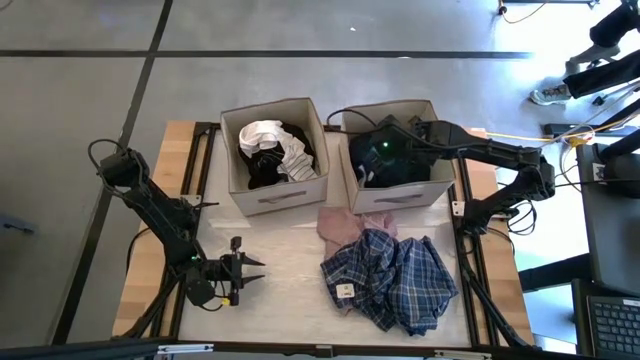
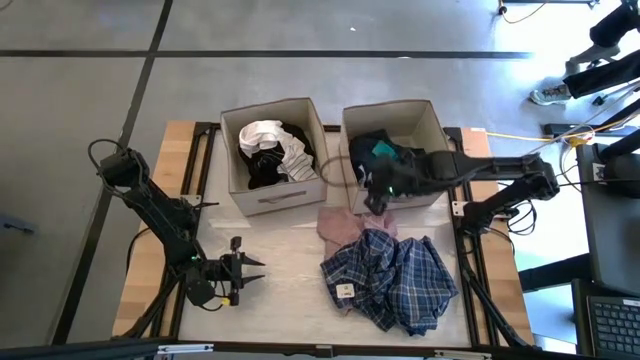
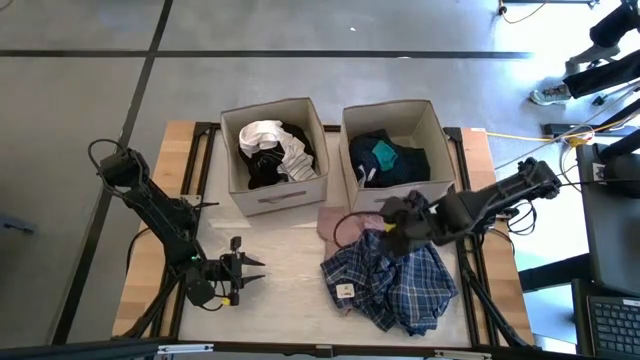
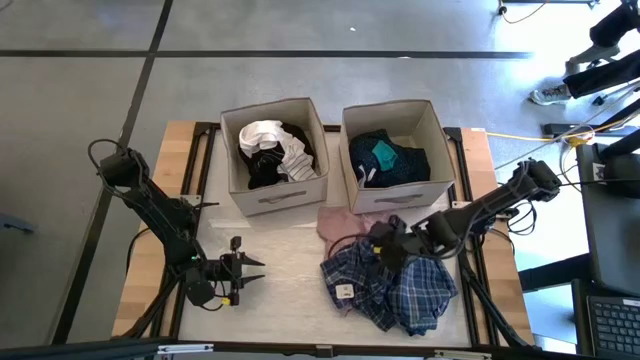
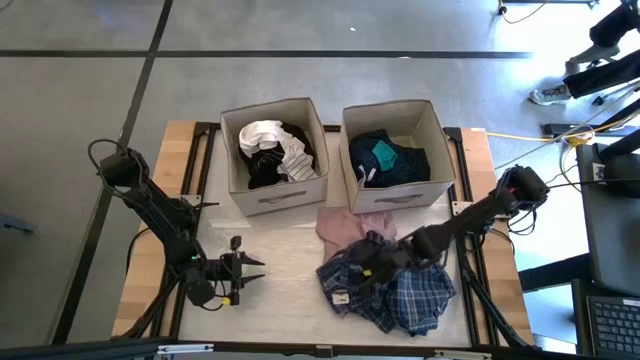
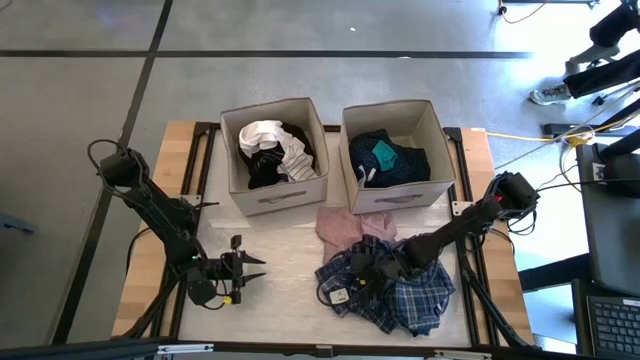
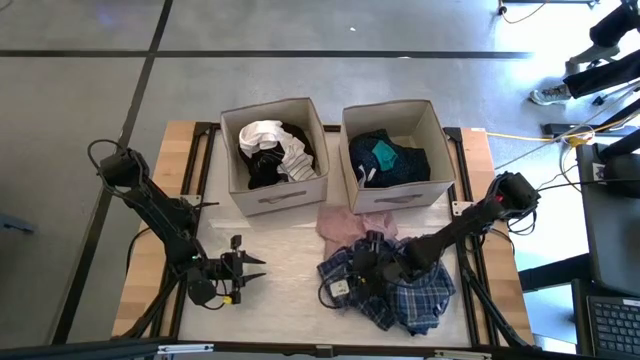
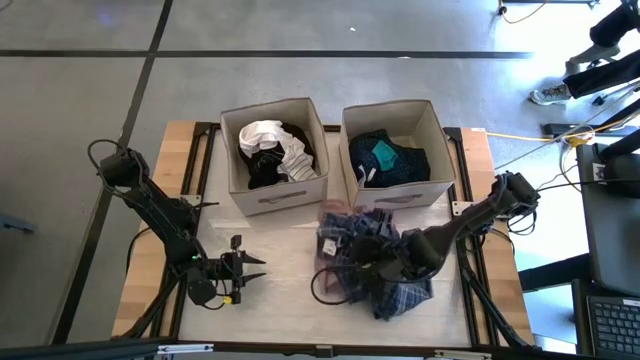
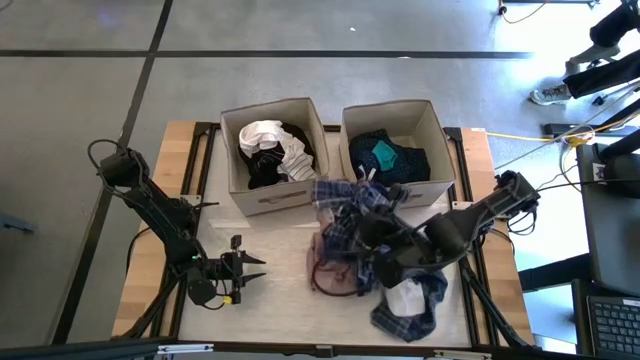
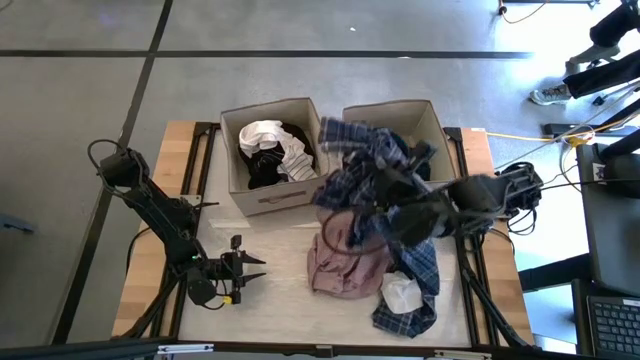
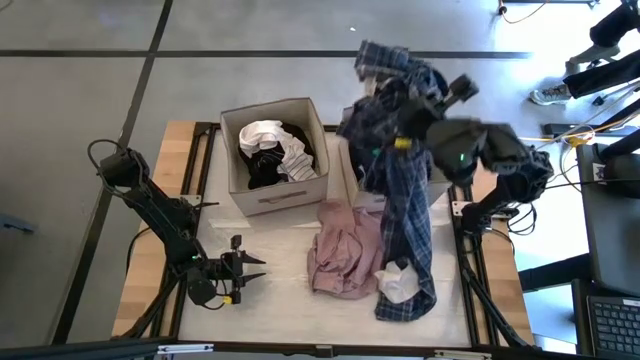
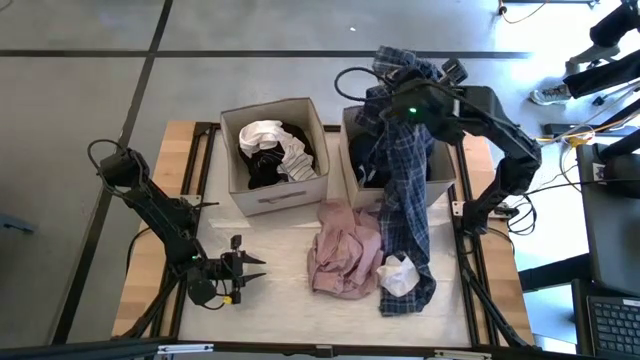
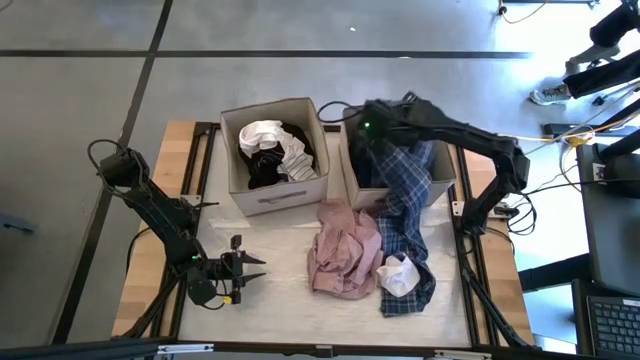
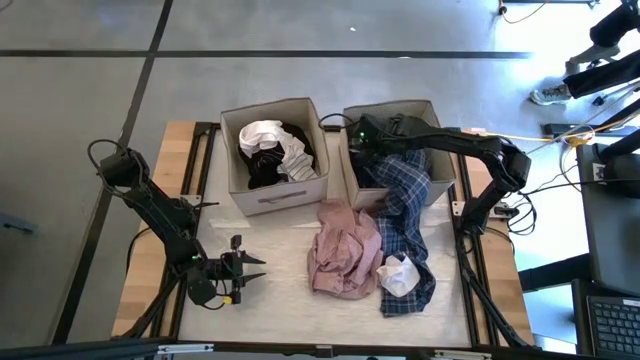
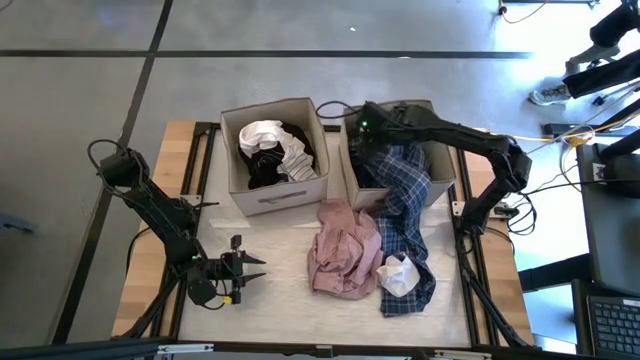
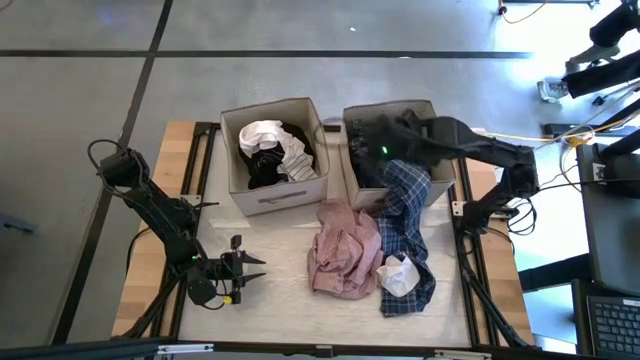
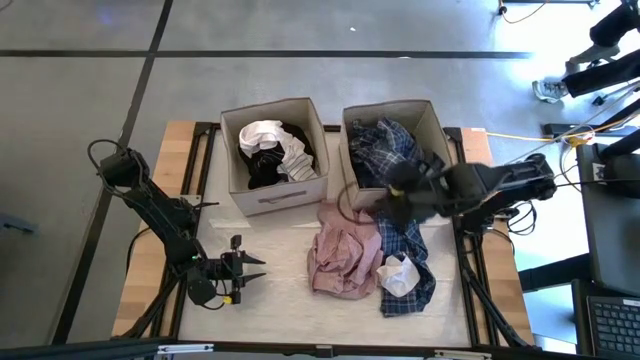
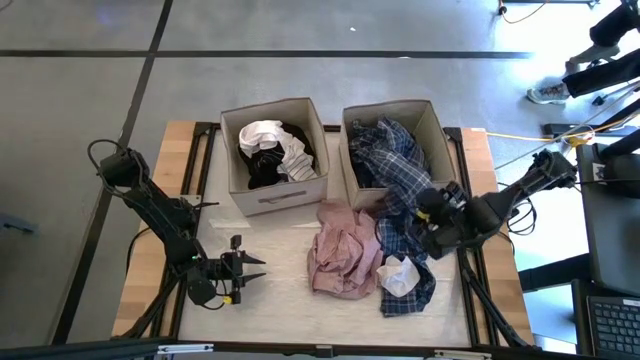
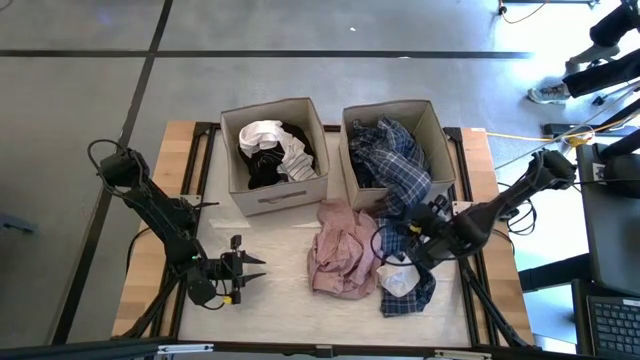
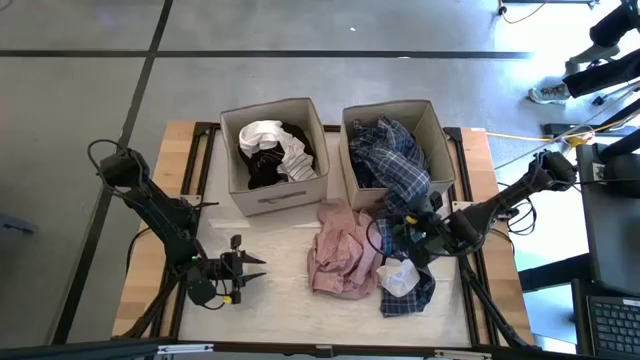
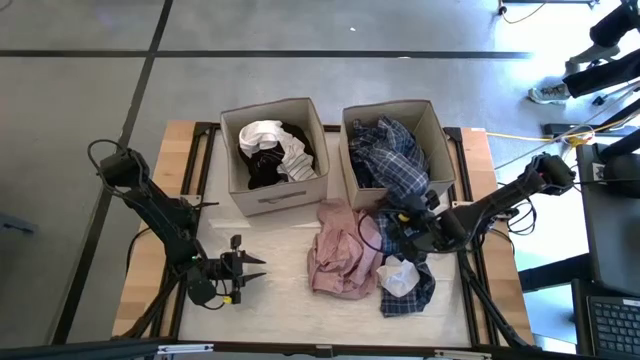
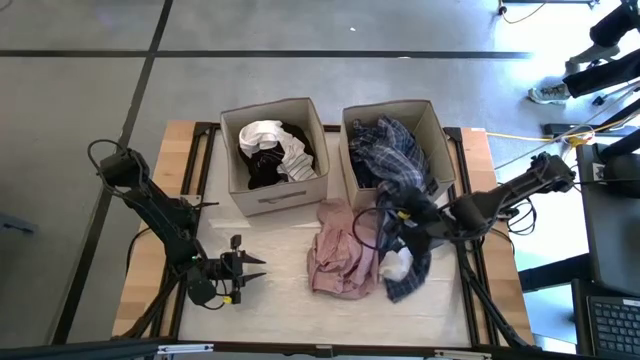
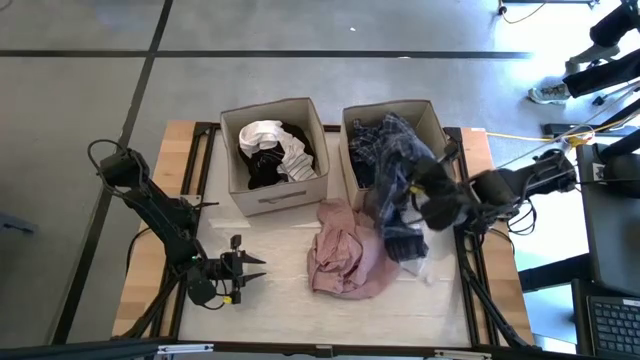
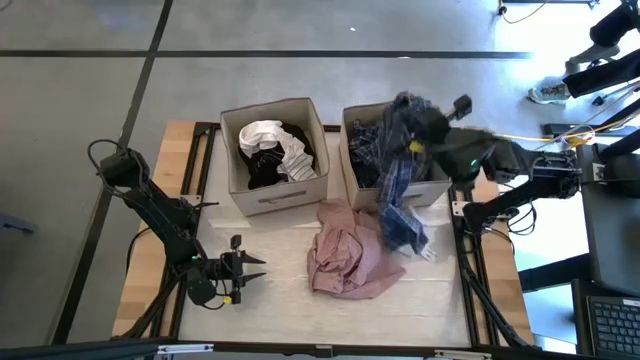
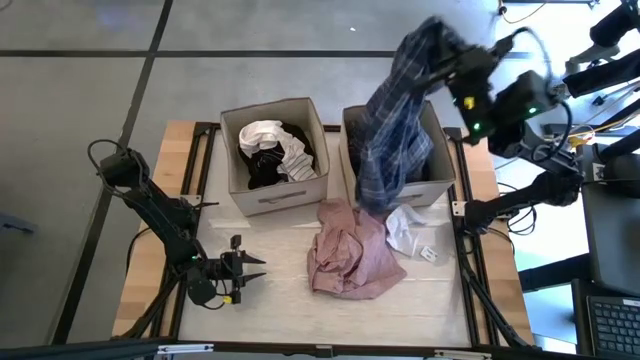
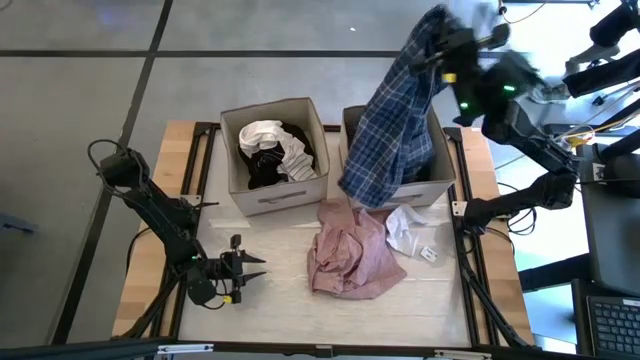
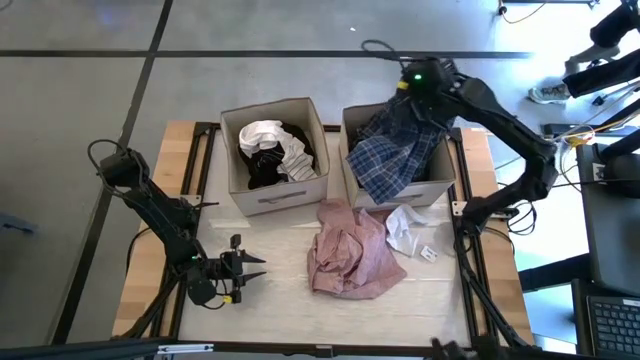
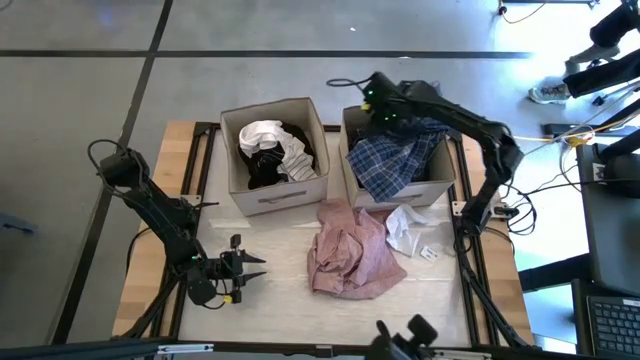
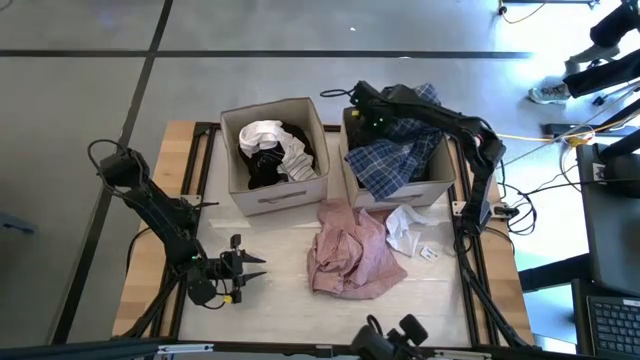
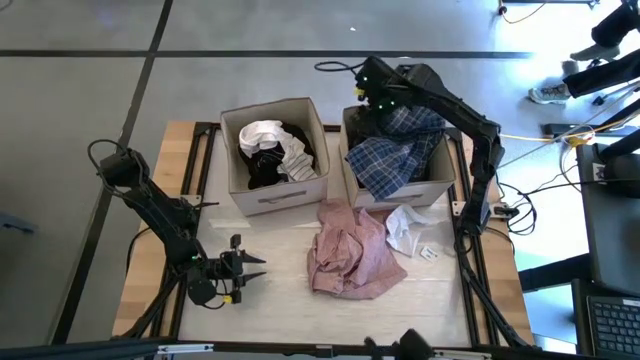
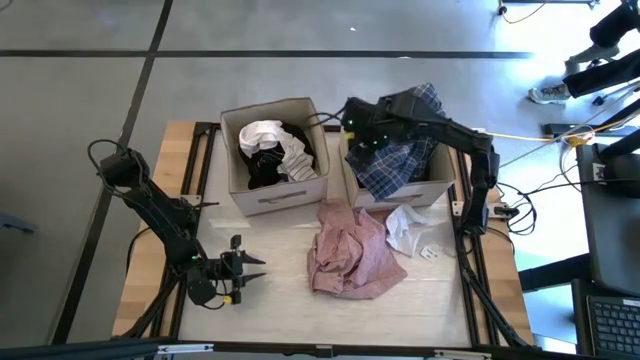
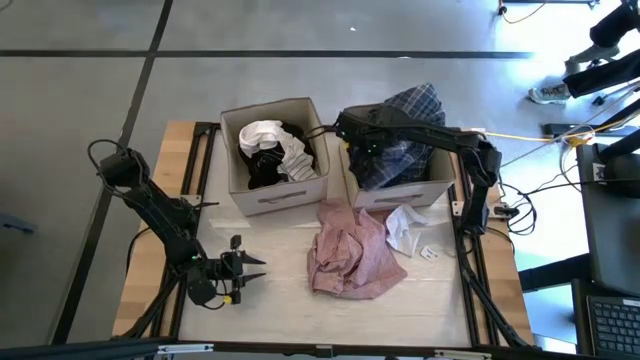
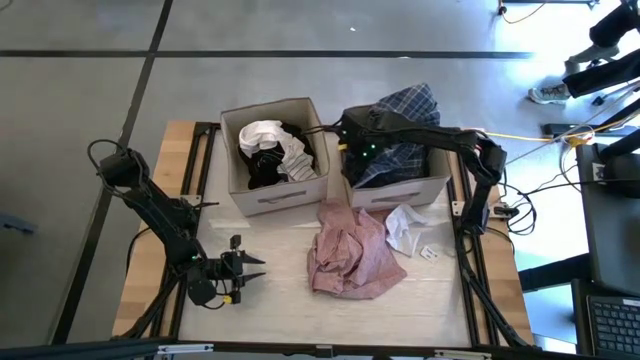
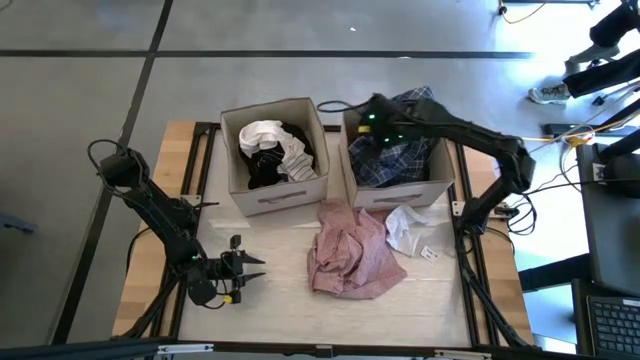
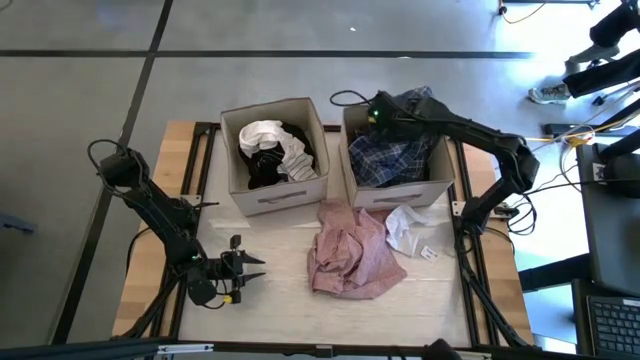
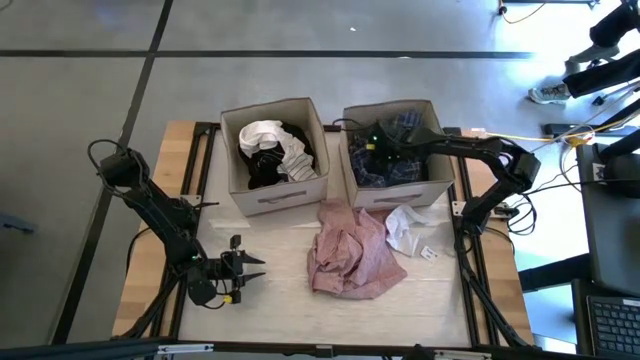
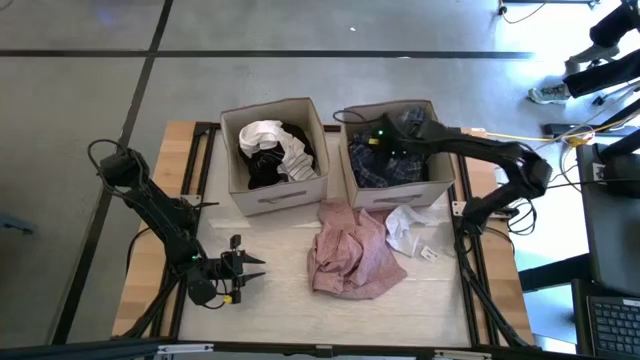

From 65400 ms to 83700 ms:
Task: Sort clothes
Put the blue polo shirt into the right laundry organizer

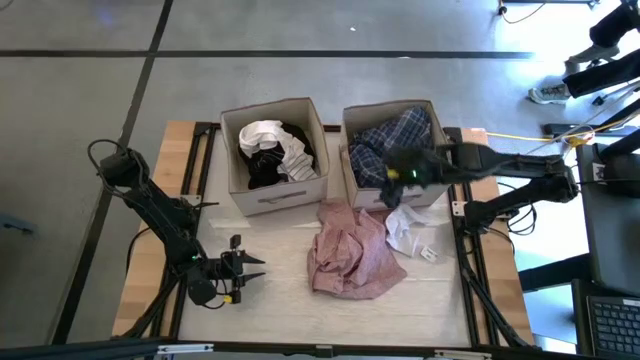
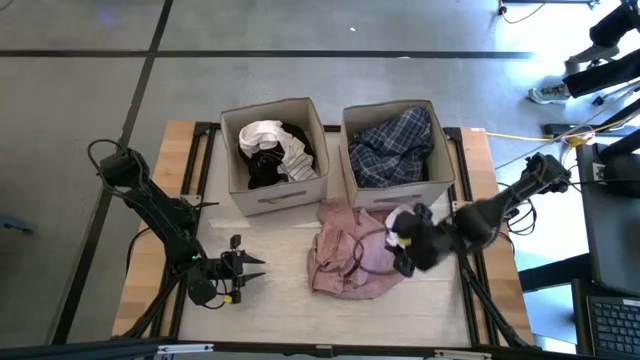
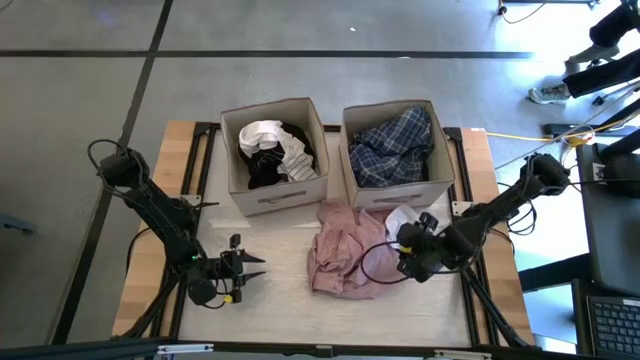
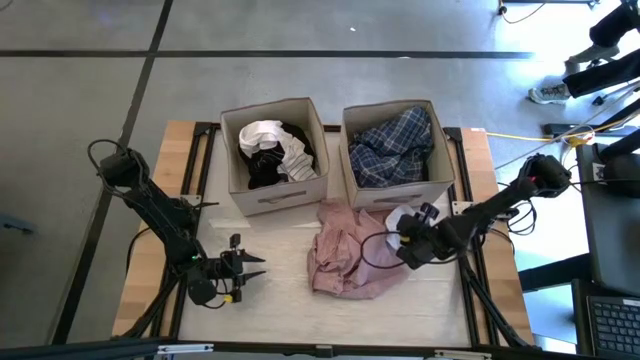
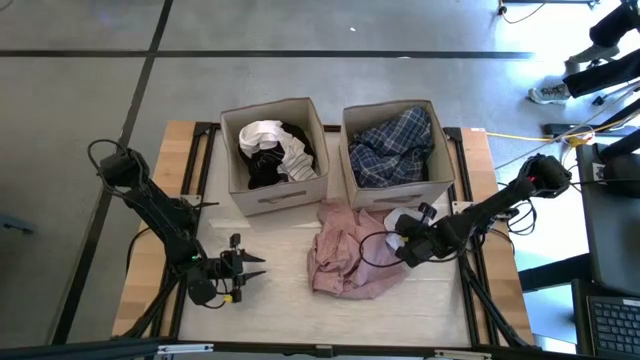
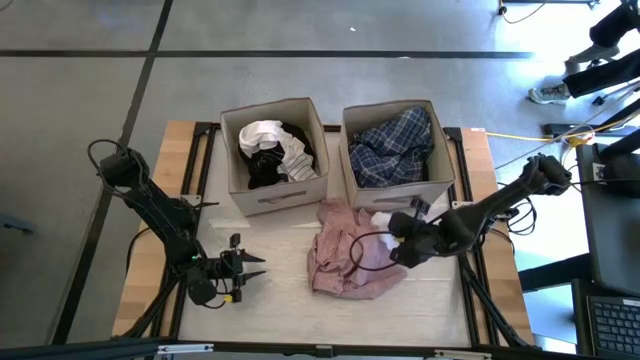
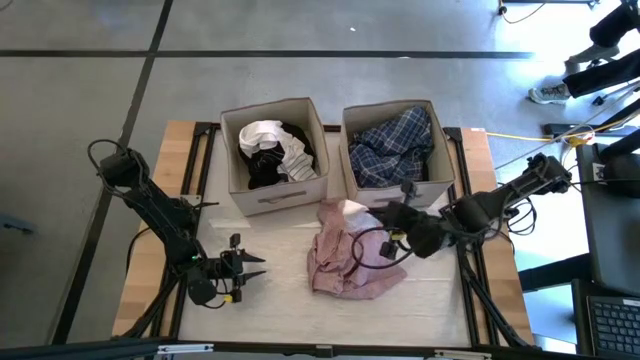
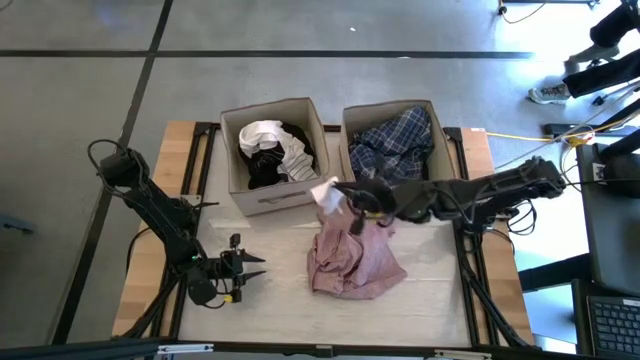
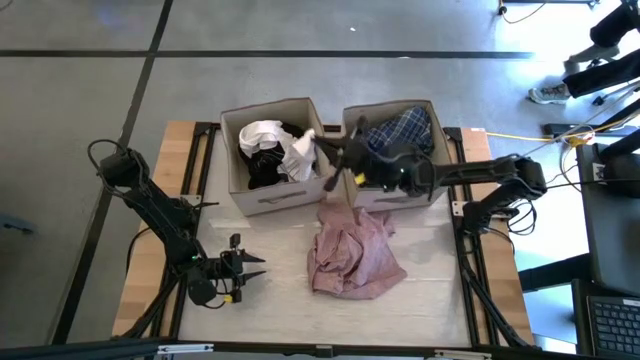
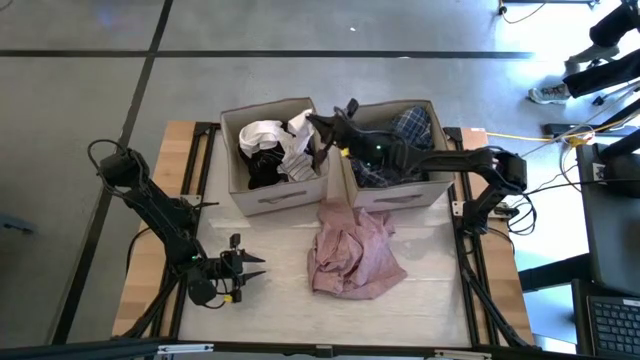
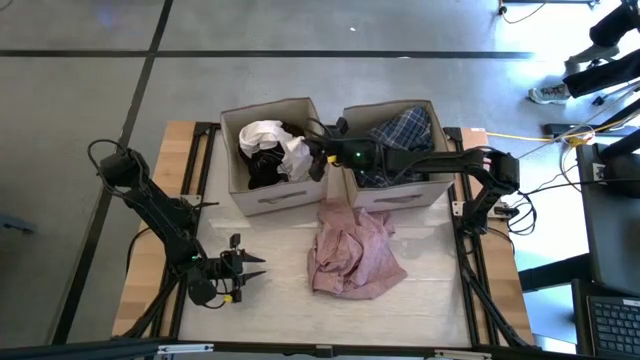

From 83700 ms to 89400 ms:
Put the white sock into the left laundry organizer
